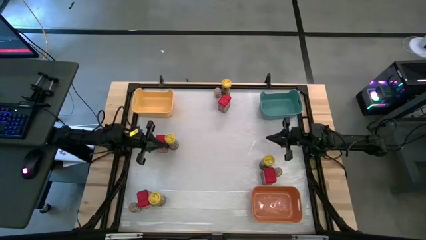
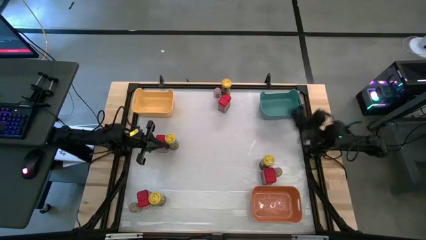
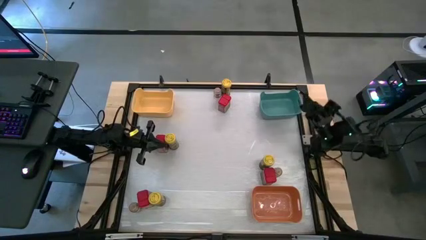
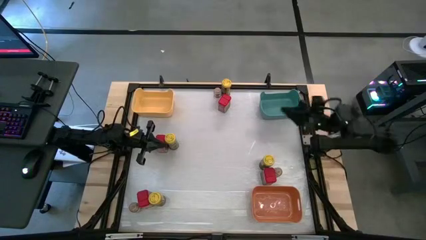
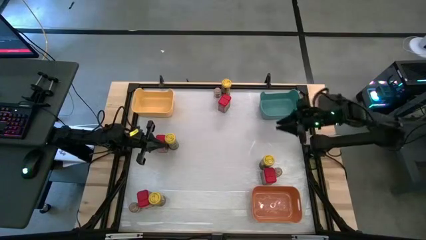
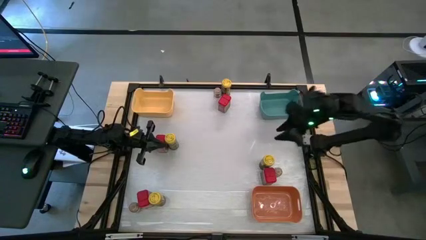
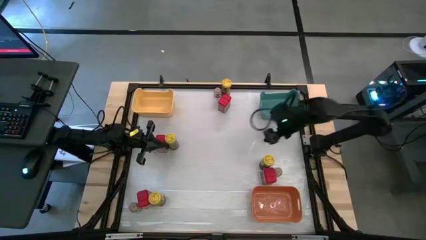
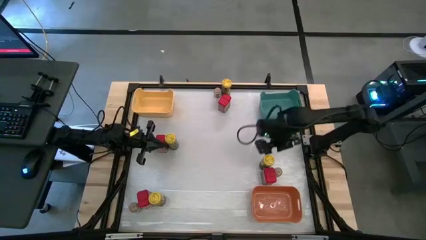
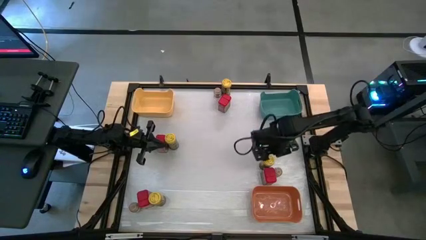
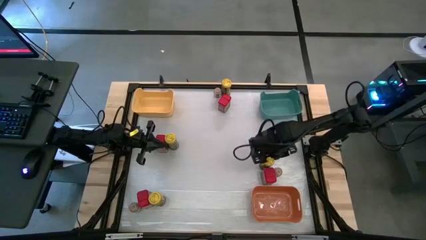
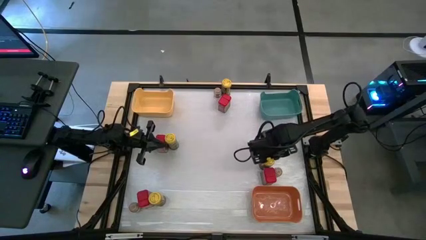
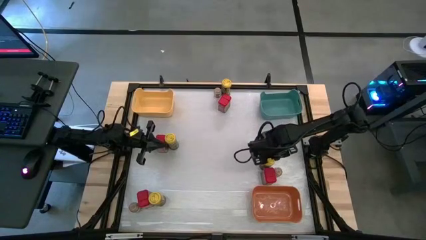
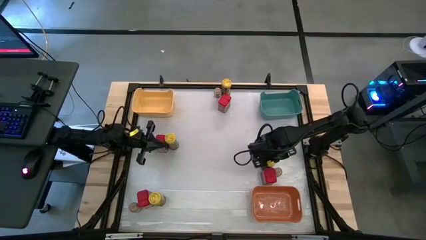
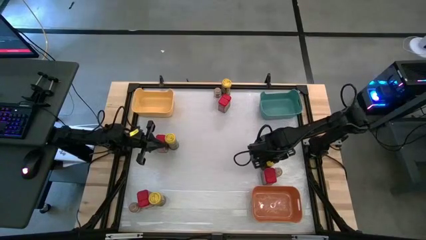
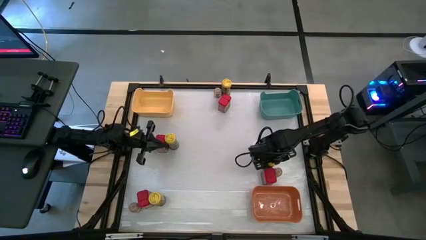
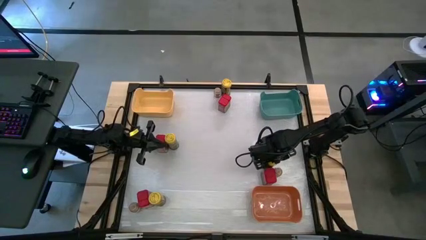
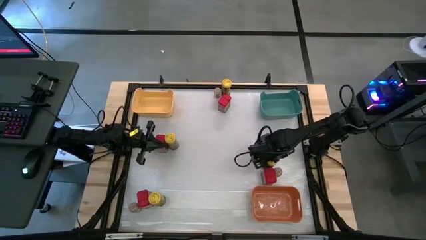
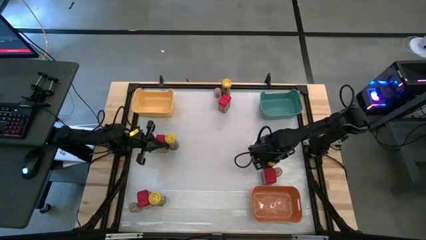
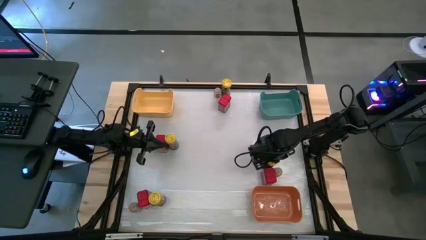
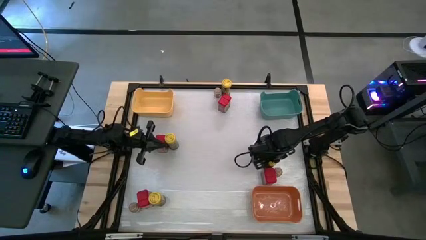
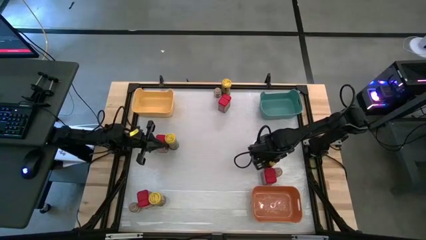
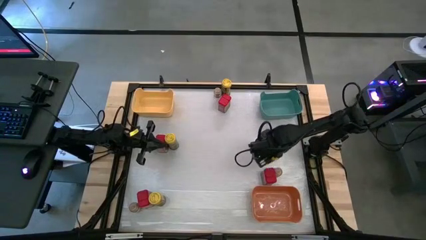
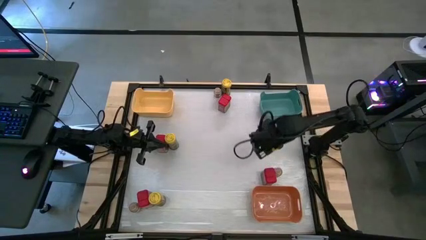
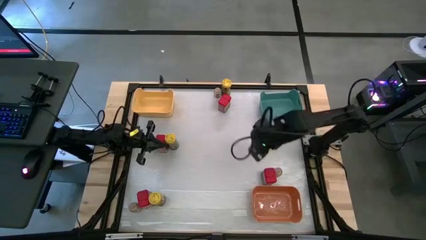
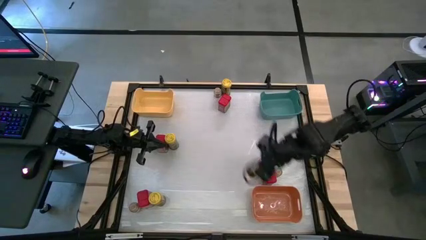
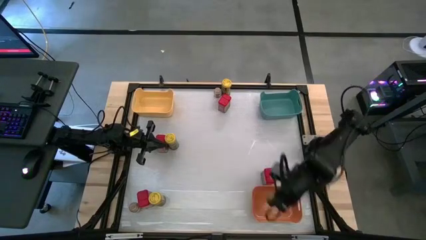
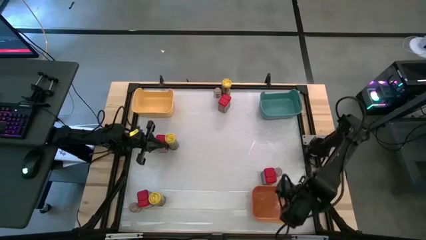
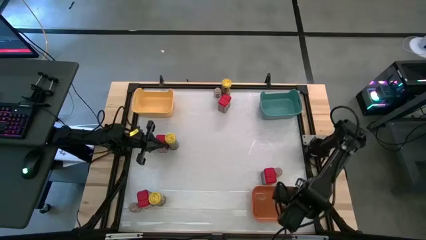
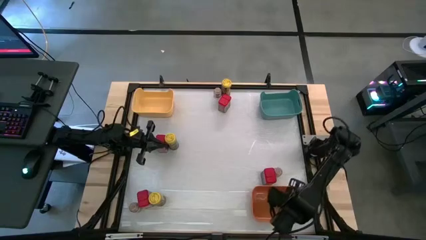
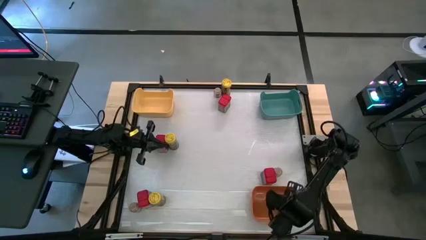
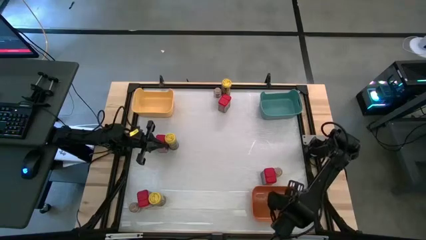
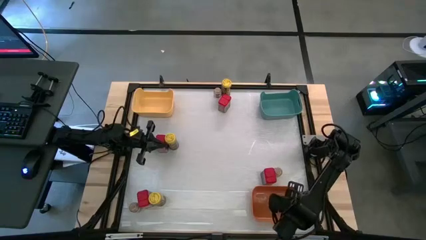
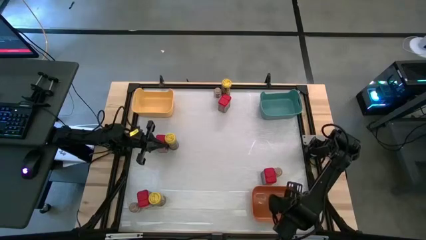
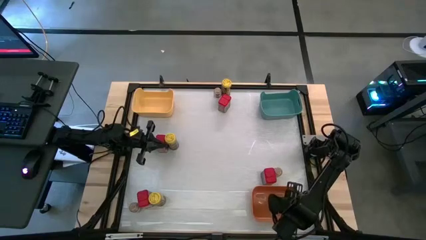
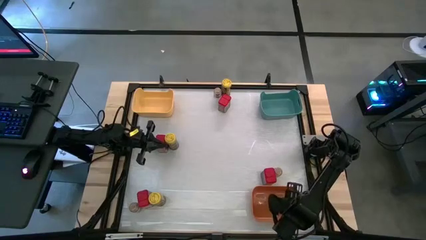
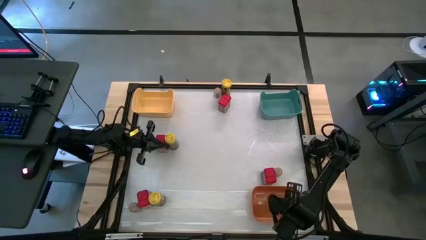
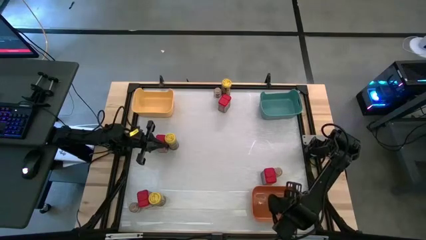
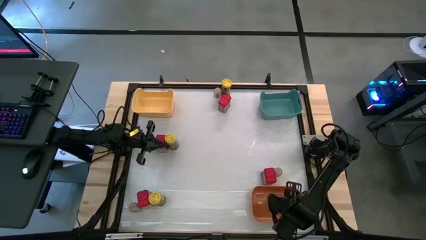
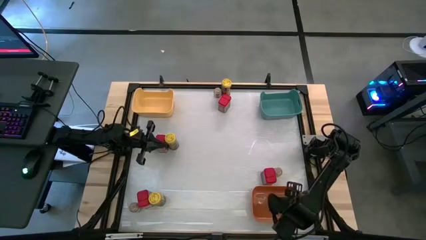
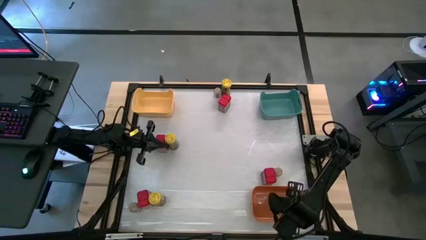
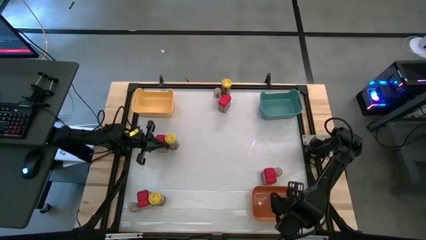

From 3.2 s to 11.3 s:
Task: Sort spices by type
Put the middle right yellow seasoning bottle into the orange bin

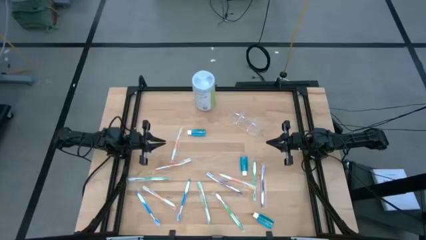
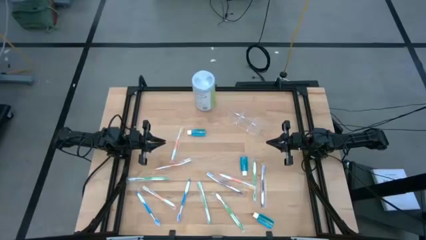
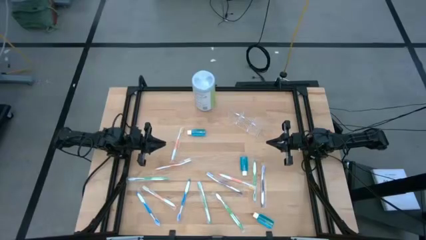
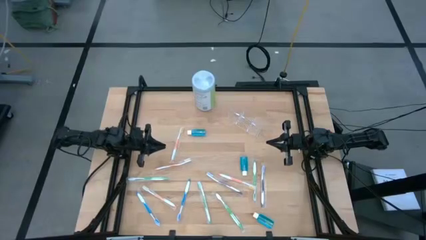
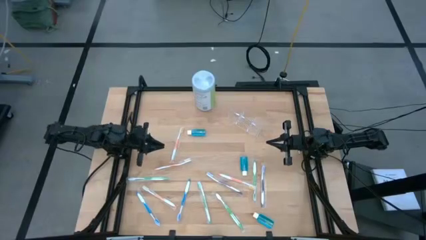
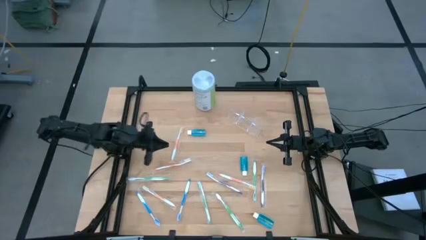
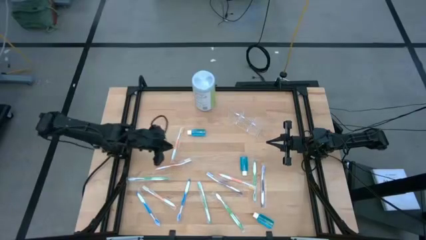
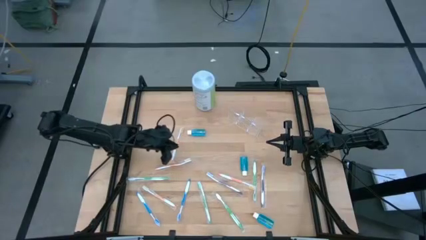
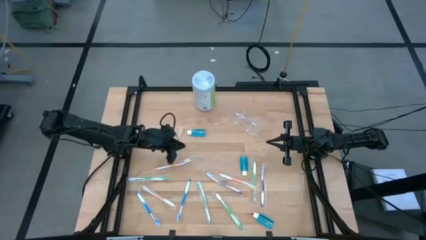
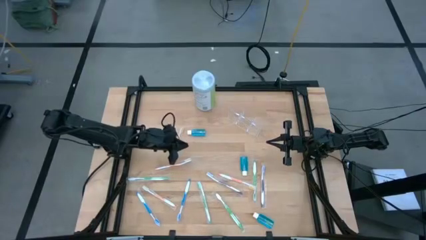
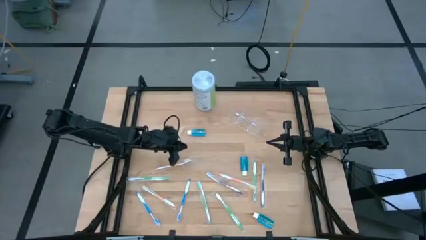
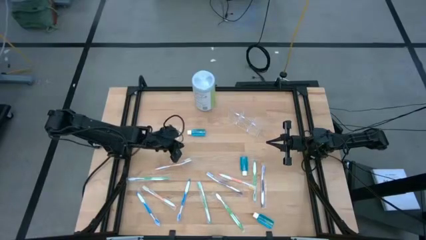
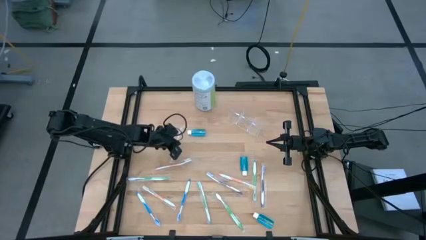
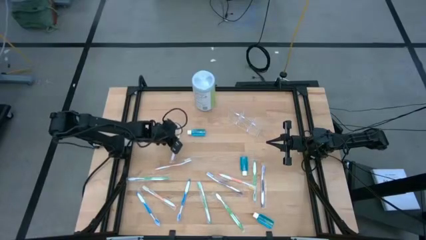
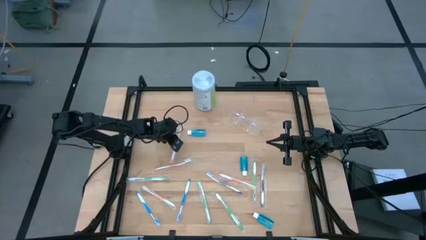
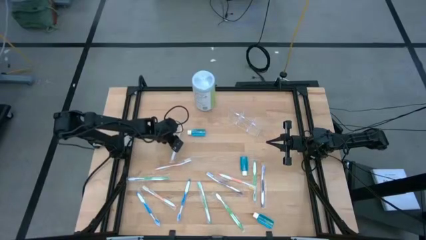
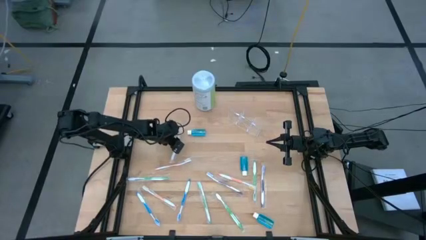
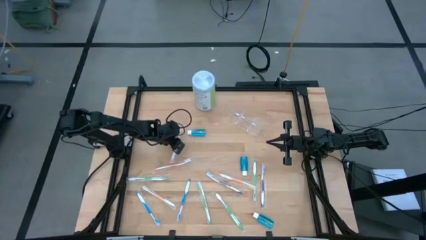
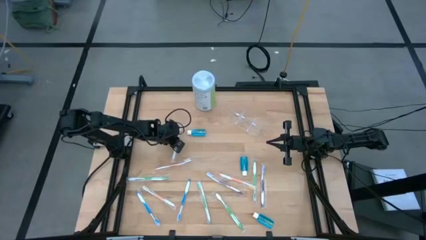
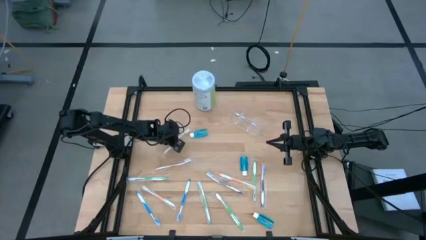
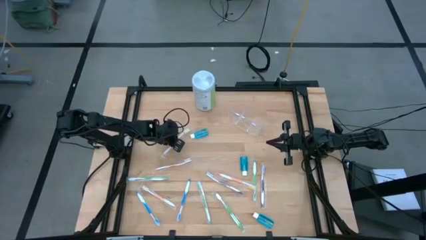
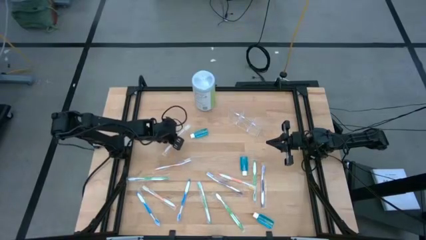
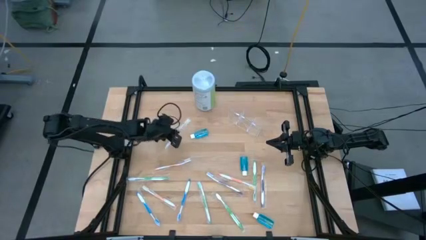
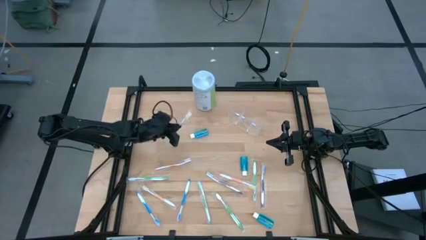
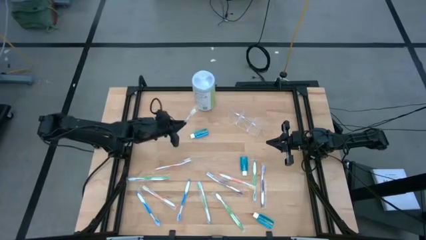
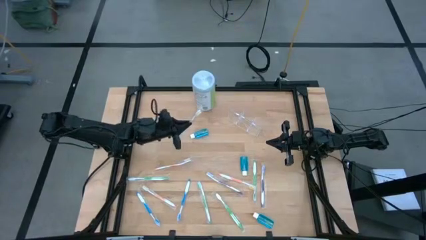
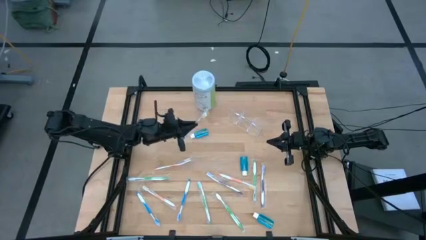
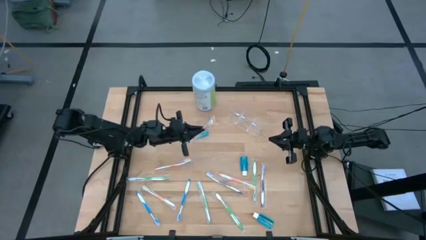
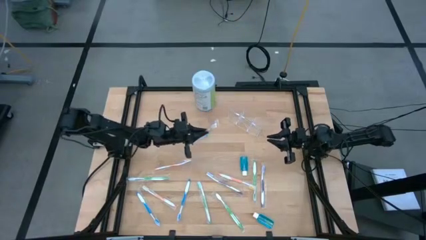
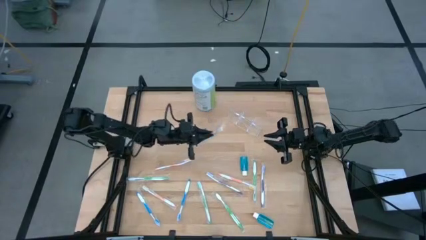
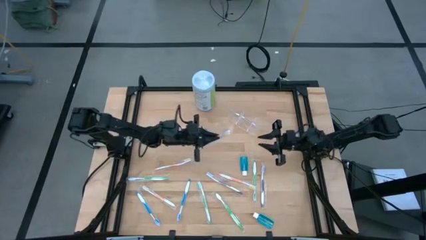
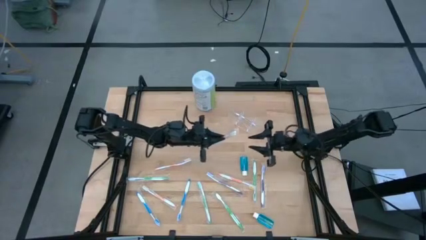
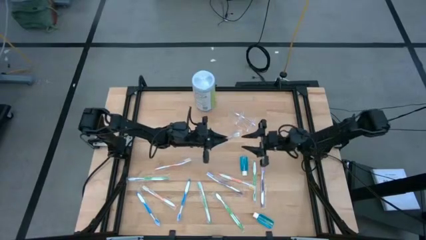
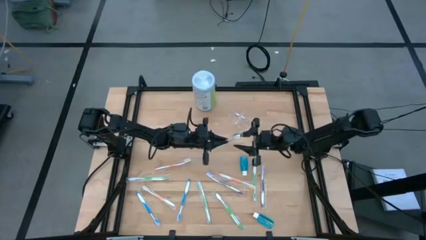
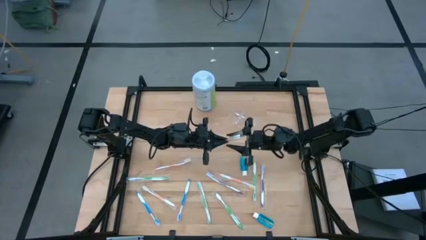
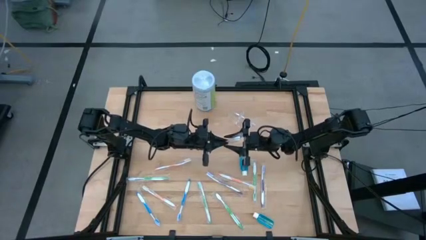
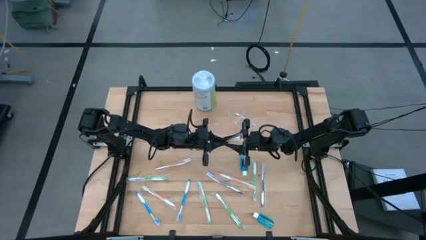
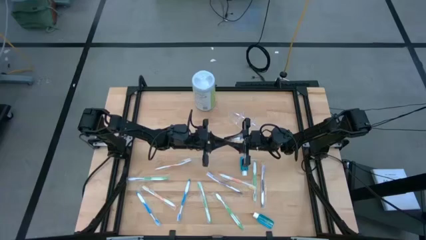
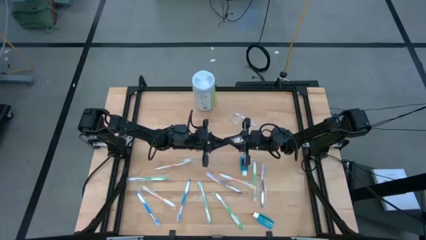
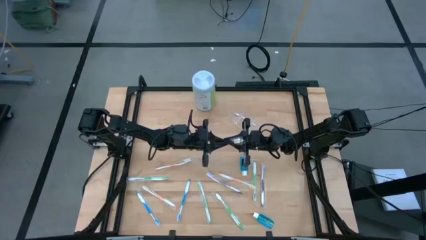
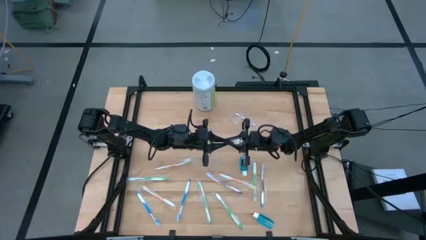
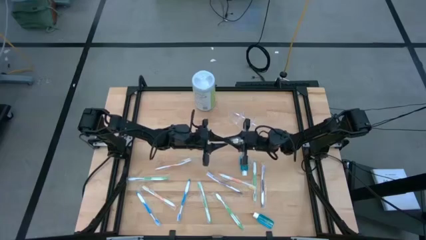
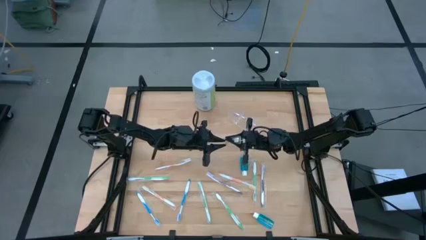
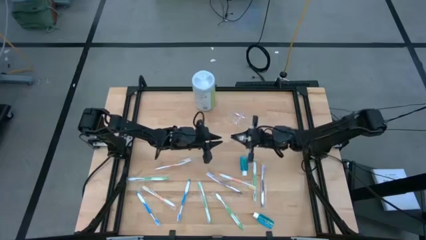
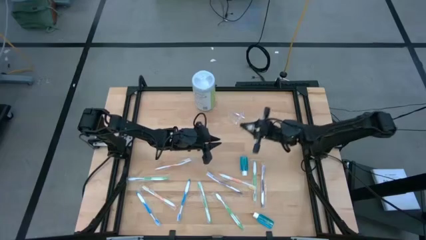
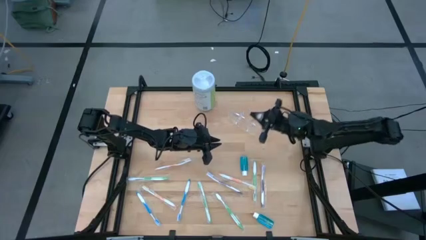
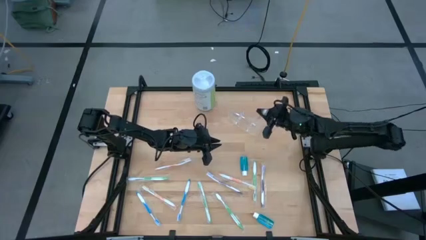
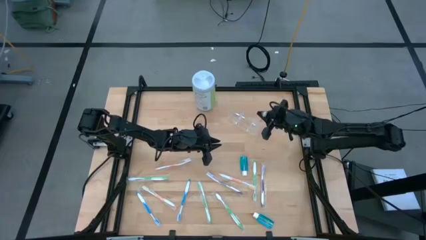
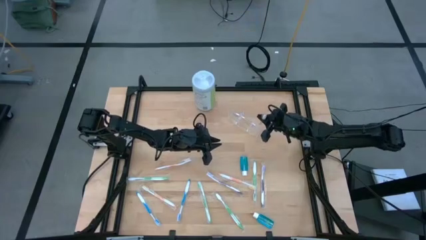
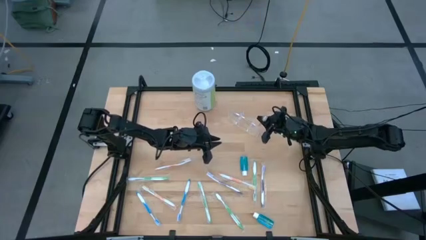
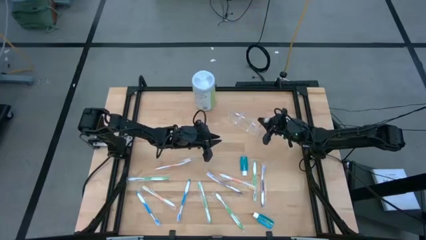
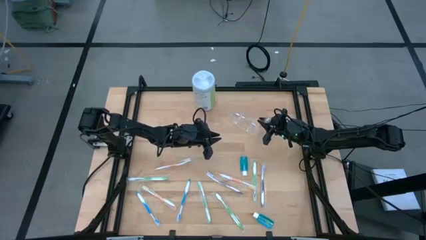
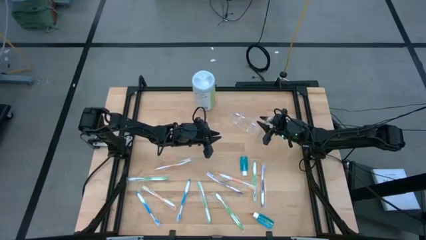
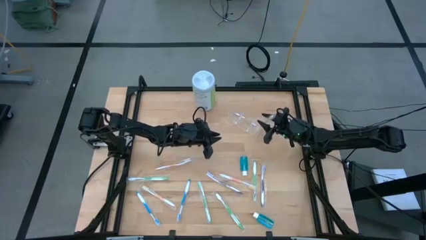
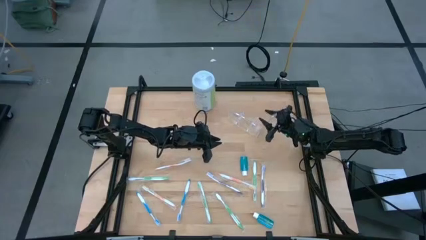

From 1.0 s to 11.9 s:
Task: Pick & Place toothbrushing station
Put the orange toothbrush into the transparent organizer
